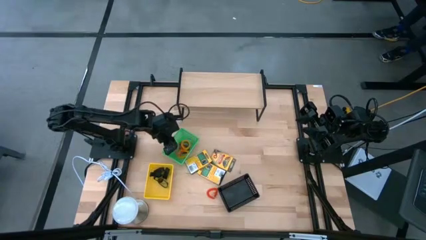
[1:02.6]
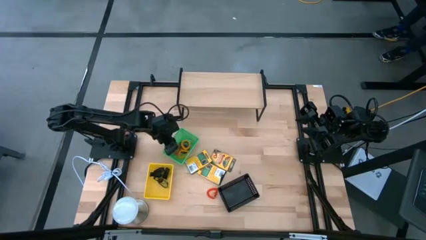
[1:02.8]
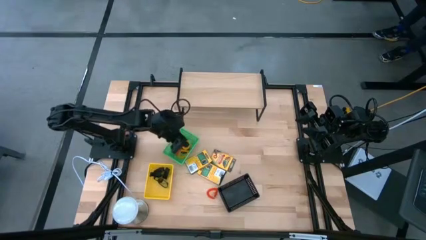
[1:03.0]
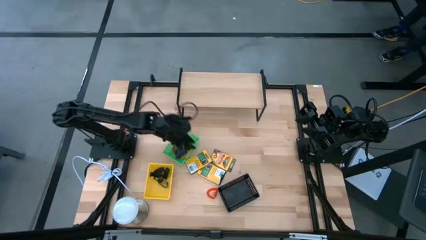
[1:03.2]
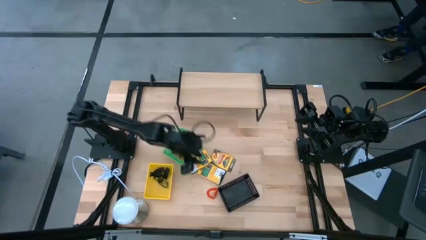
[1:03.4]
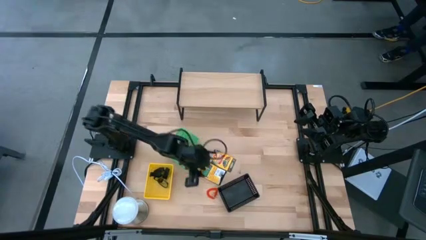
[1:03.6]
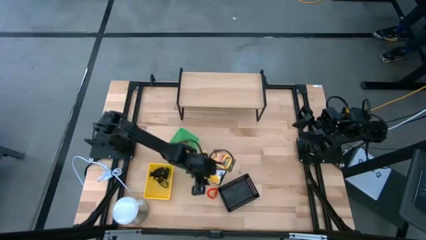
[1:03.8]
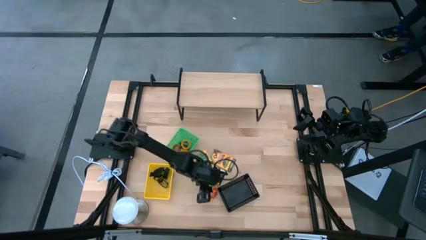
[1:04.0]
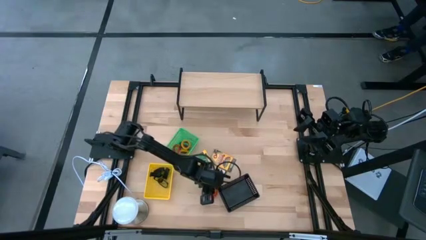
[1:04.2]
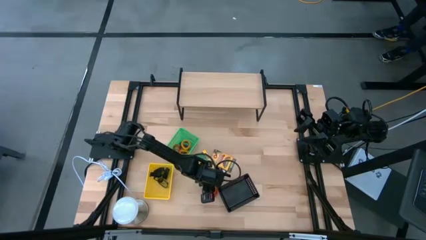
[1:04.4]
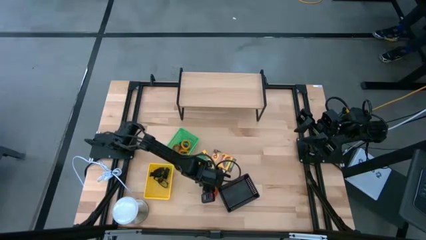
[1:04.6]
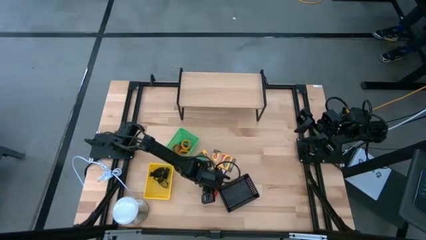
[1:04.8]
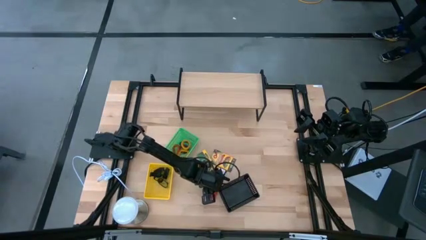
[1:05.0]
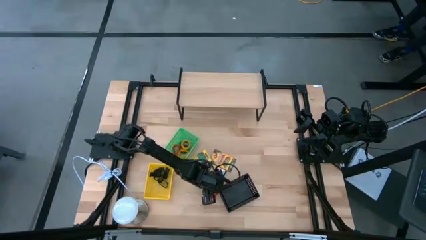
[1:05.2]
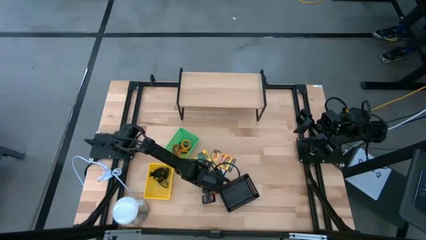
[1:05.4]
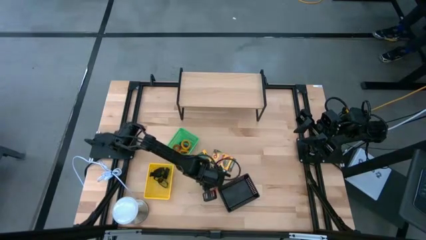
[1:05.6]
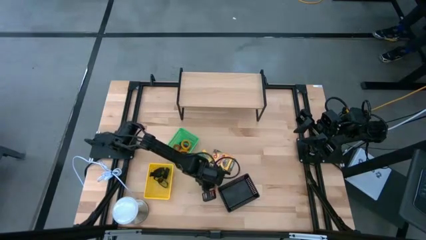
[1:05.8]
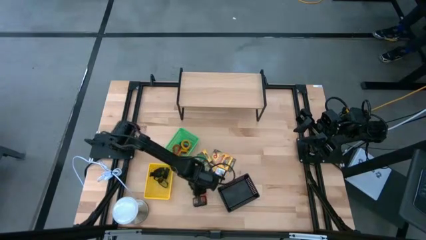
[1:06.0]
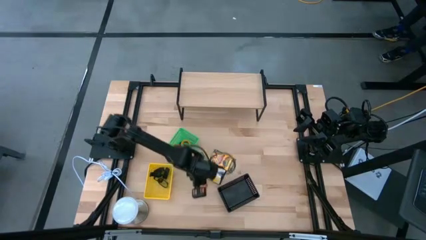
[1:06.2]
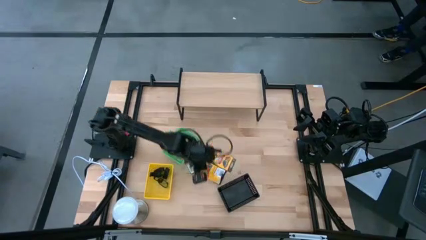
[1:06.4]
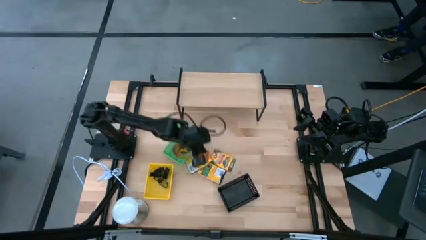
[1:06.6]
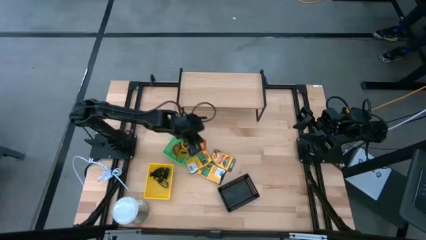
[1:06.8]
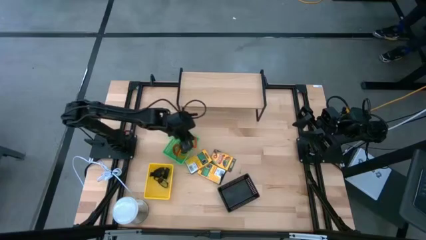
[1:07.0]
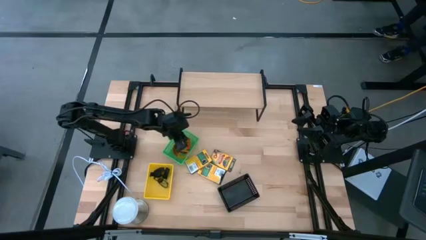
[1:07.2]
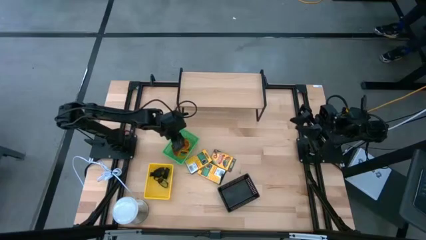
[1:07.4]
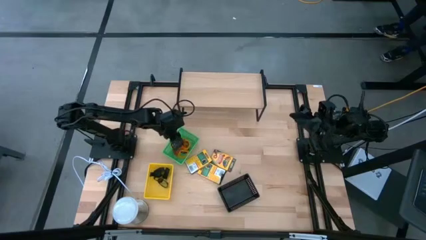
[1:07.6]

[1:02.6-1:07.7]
Task: Pick & Place Office Desk Supplies
Put the orange spring keychain into the green basket

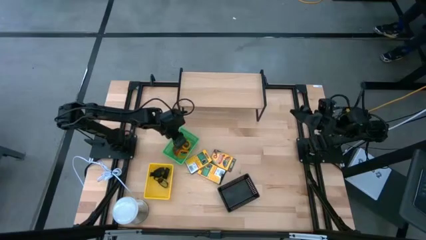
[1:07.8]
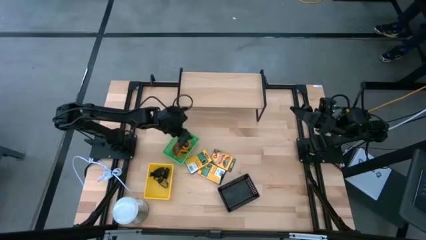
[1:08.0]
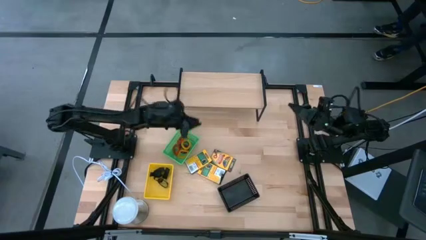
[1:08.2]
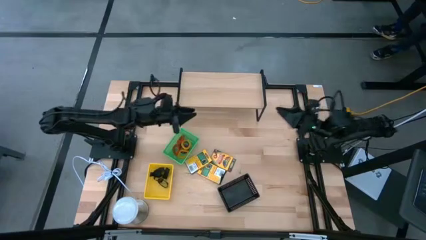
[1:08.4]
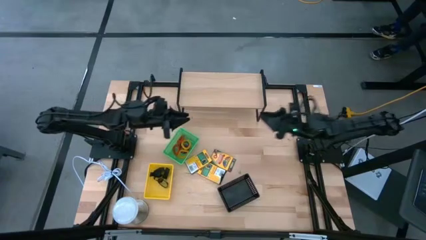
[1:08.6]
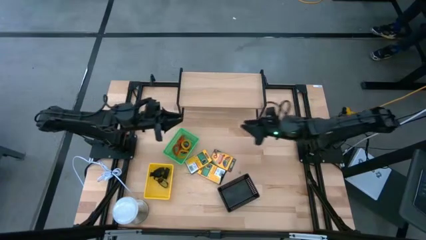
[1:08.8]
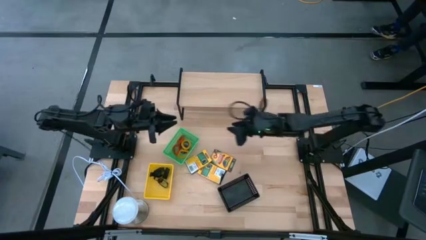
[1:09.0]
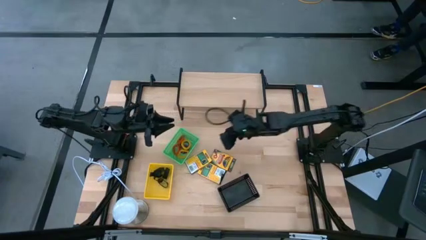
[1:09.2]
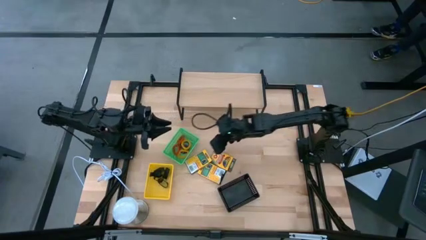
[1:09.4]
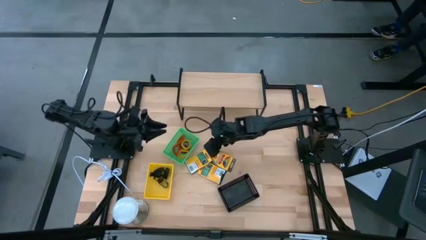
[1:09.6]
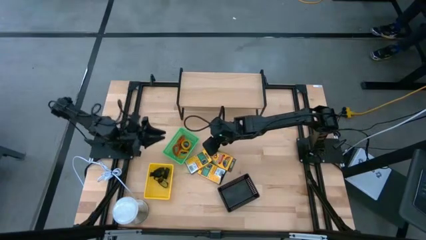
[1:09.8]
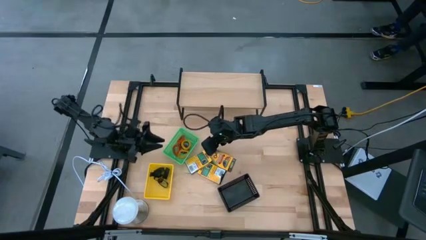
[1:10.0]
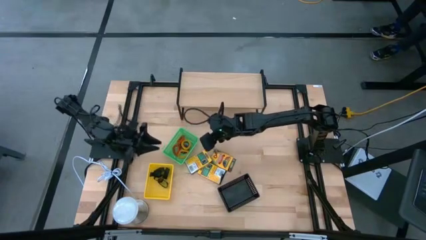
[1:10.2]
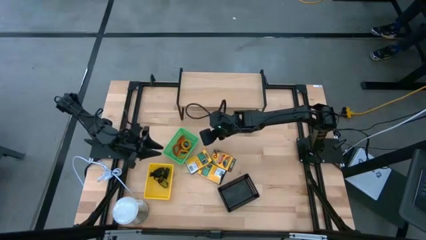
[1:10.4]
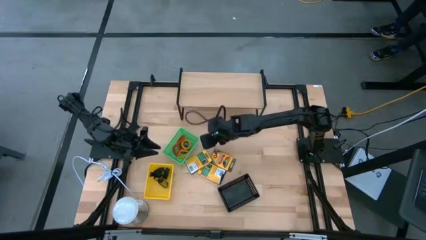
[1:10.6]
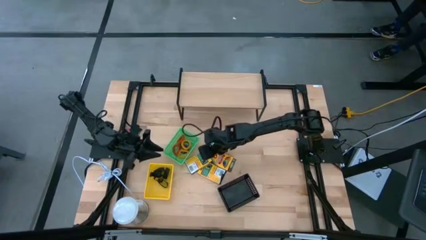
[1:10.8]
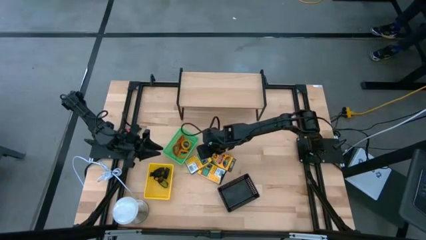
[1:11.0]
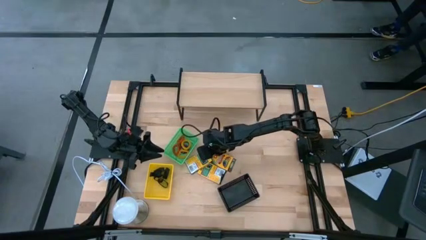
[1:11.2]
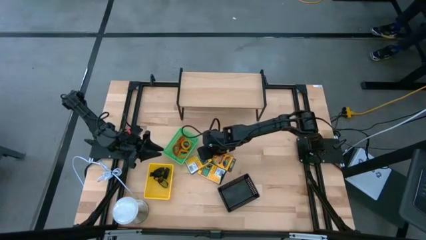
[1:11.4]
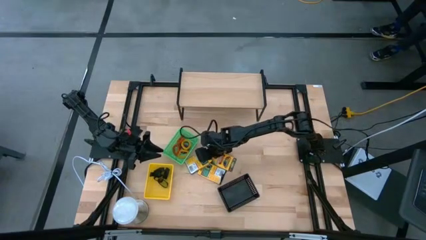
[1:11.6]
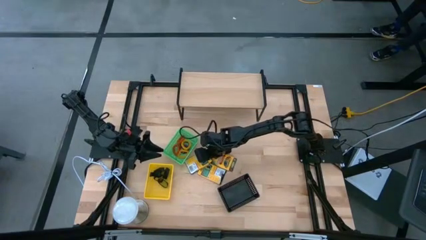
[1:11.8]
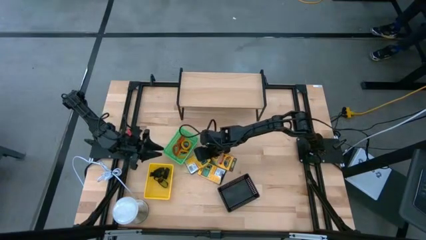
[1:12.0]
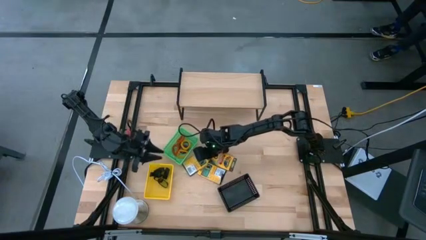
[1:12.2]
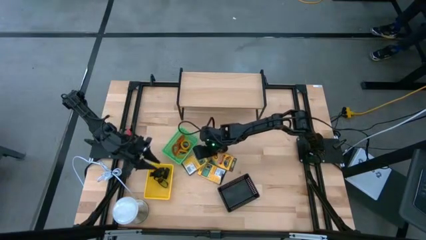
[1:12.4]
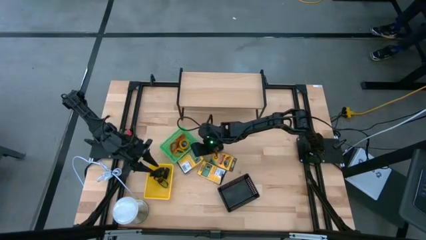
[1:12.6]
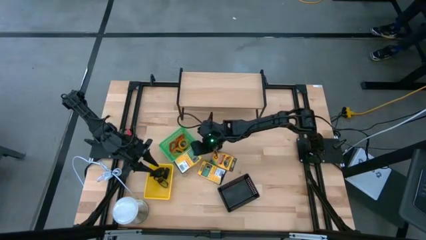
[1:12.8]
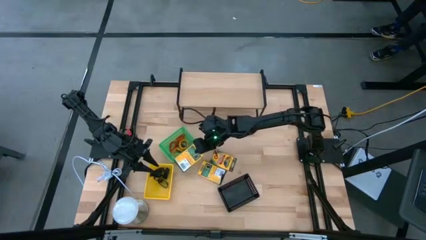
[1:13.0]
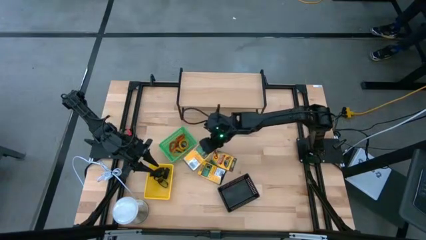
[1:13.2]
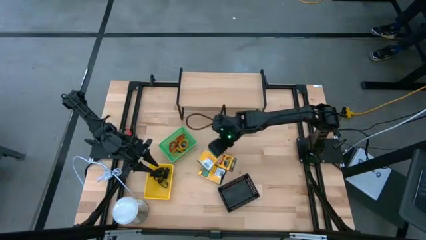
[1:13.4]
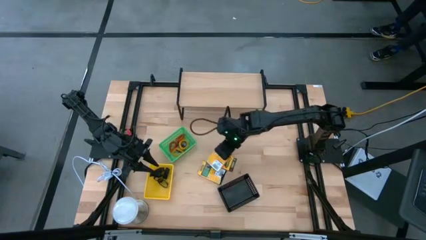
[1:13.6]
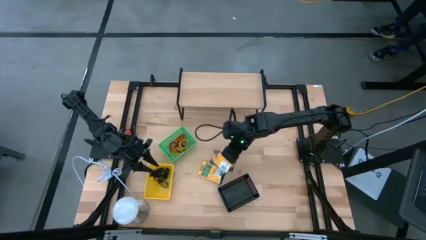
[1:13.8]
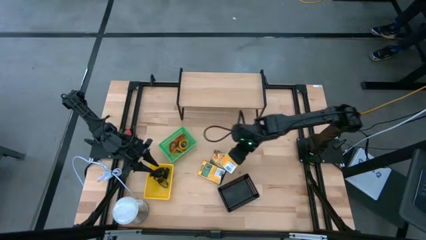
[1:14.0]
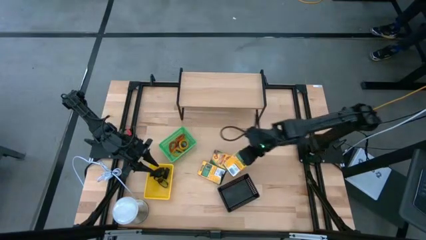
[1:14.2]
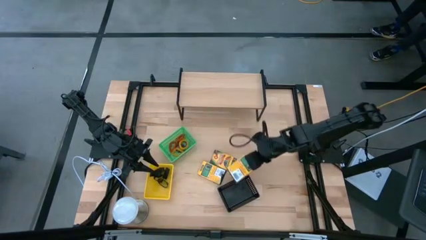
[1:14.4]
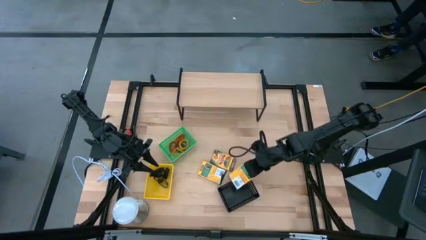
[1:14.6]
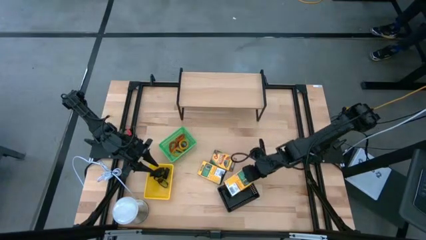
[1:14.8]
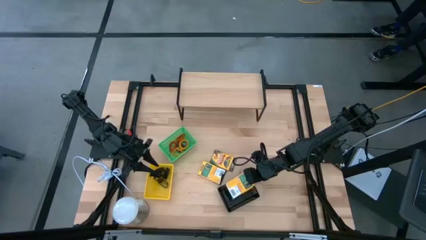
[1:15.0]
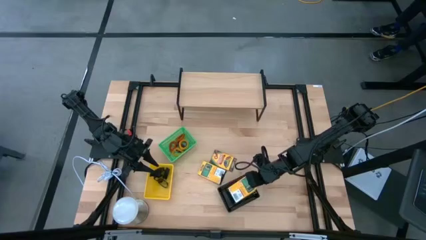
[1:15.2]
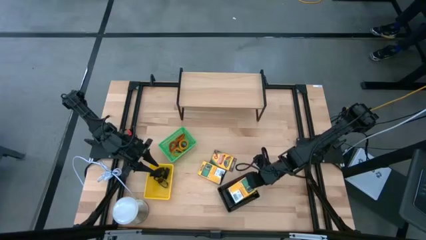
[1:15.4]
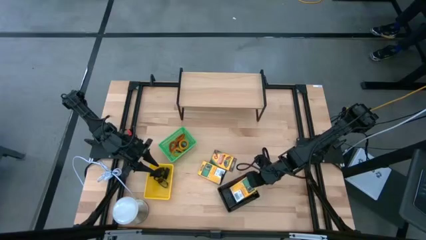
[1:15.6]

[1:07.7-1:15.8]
Put the crayon box into the black basket

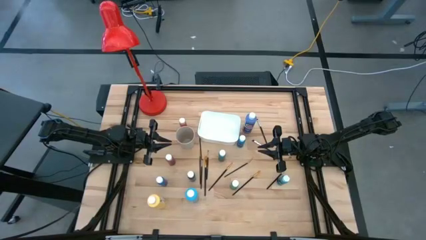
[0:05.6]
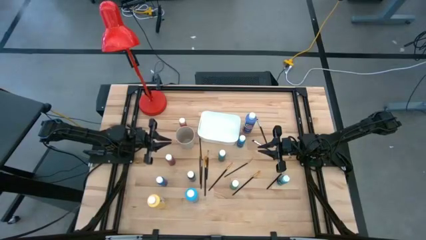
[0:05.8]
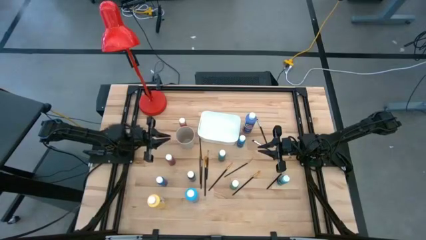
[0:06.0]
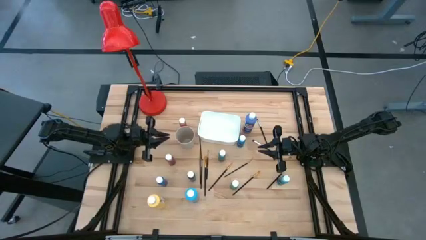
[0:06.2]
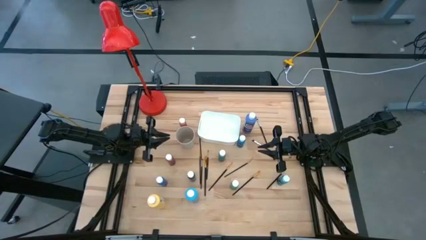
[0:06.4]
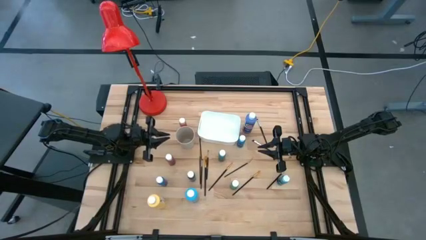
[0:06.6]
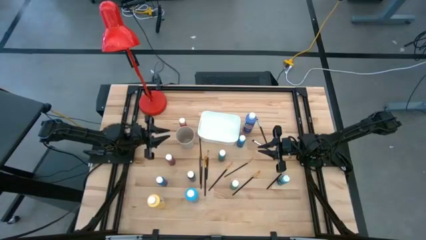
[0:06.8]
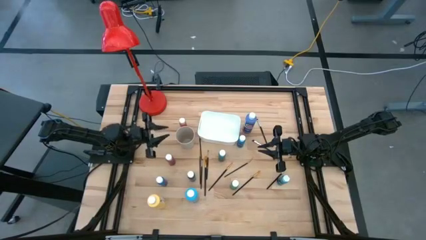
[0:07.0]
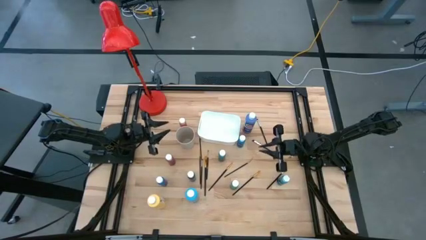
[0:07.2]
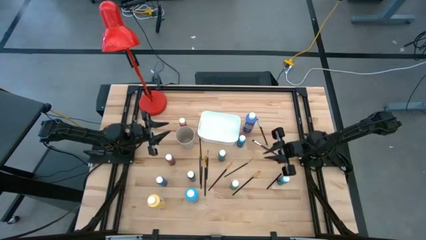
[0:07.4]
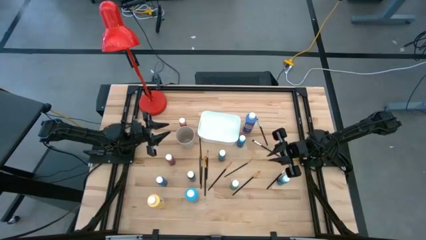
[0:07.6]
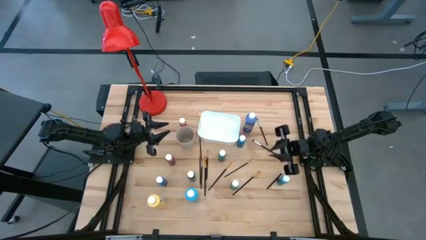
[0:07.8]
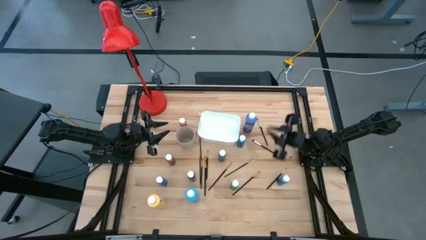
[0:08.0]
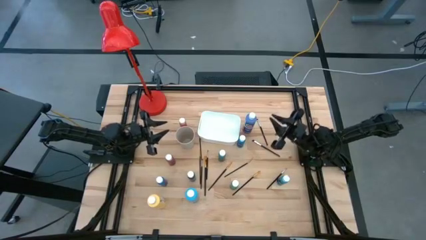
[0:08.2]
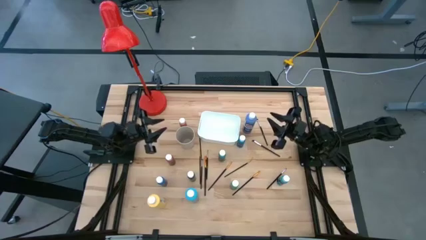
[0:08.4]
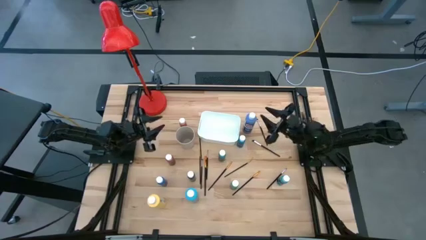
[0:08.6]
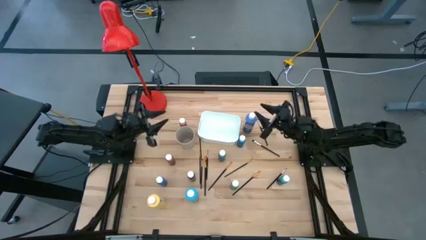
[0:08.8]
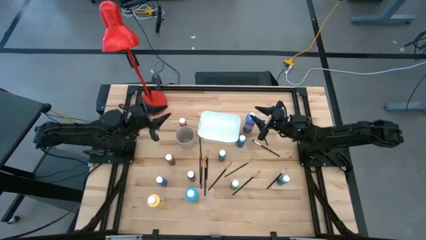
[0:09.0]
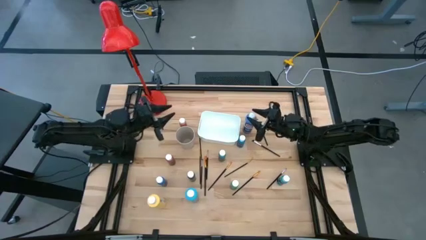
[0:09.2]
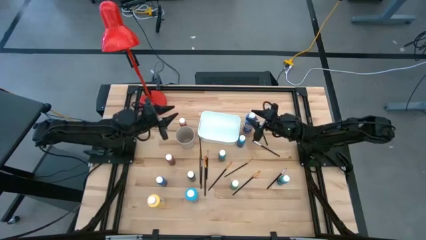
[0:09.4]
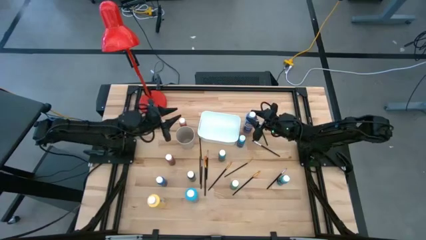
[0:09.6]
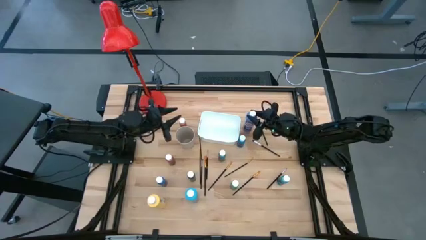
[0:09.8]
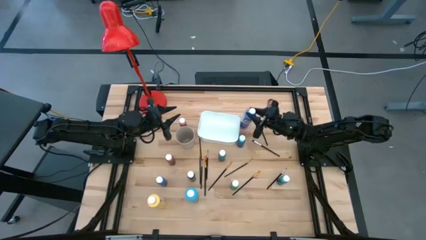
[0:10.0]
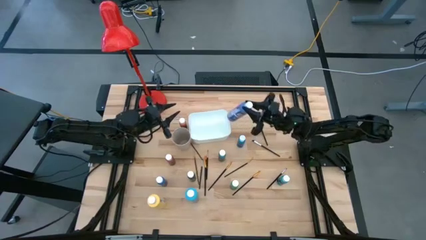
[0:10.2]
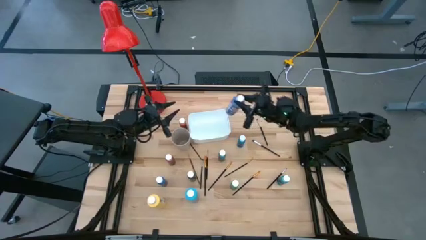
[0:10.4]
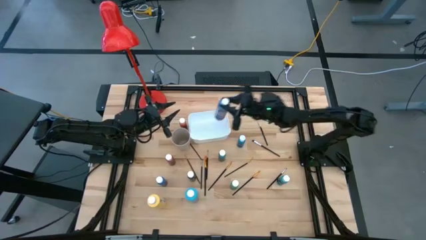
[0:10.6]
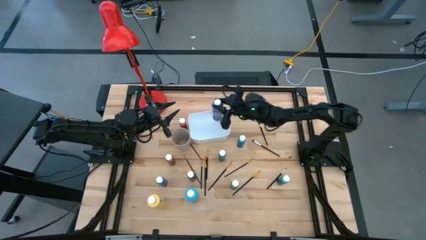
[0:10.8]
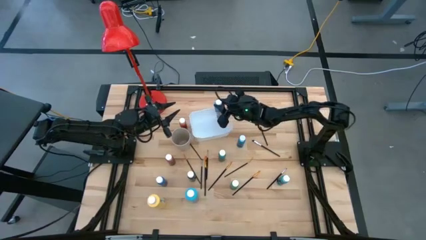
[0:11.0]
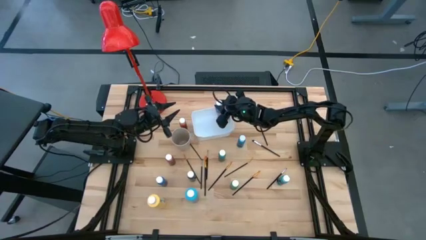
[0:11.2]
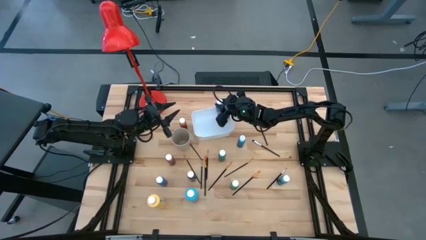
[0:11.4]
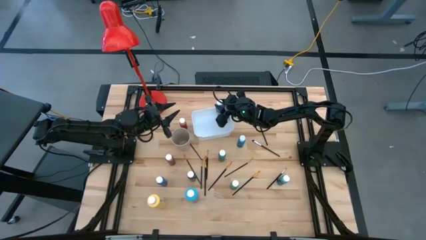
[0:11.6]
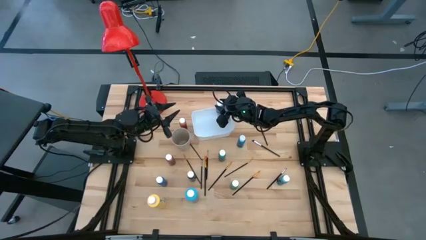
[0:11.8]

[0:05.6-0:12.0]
Task: Pick & Place Paint Supplies
Put the purple paint bottle into the white bin
